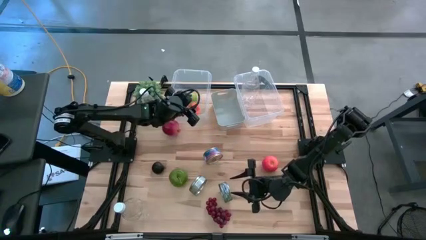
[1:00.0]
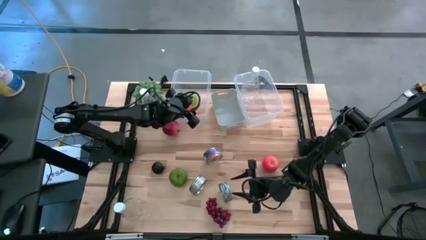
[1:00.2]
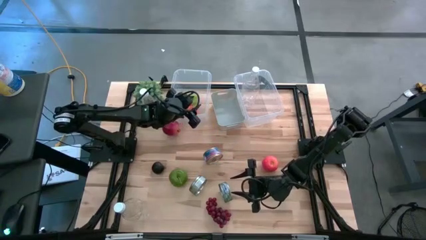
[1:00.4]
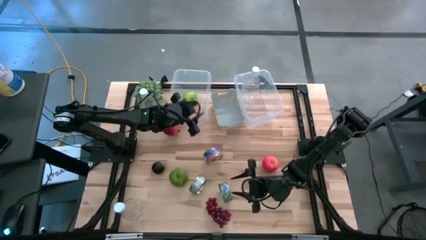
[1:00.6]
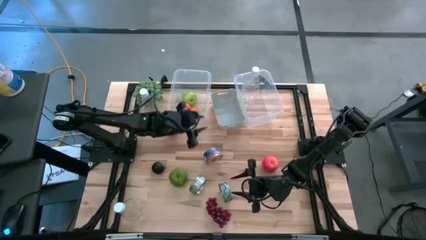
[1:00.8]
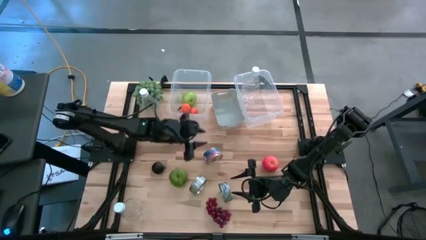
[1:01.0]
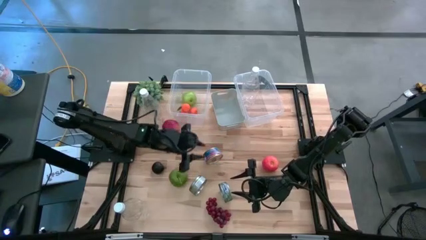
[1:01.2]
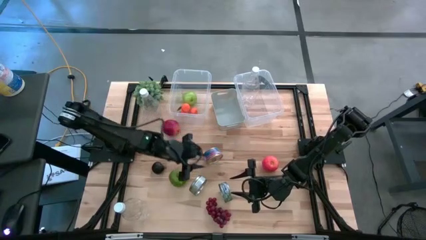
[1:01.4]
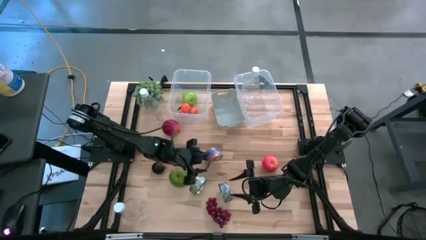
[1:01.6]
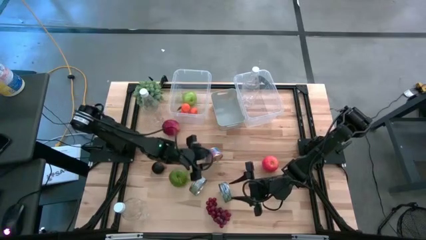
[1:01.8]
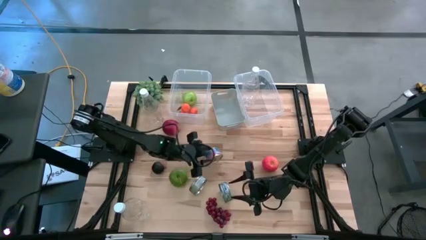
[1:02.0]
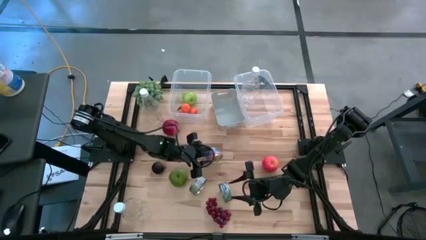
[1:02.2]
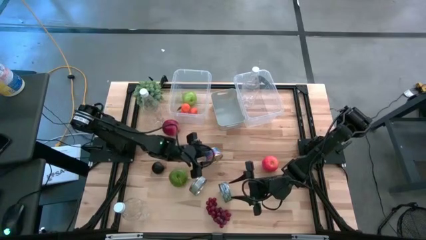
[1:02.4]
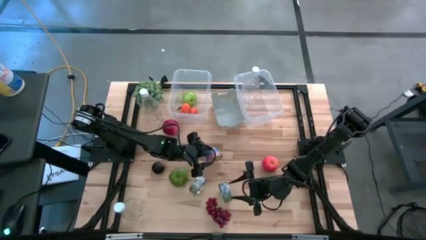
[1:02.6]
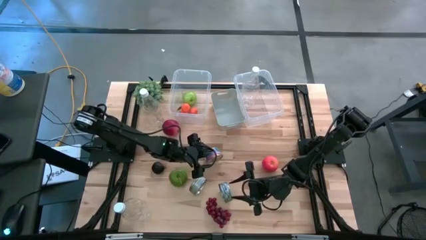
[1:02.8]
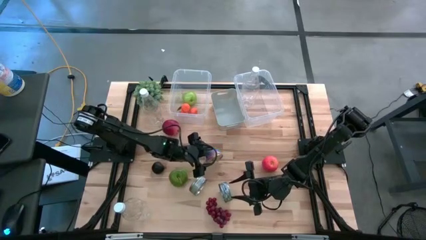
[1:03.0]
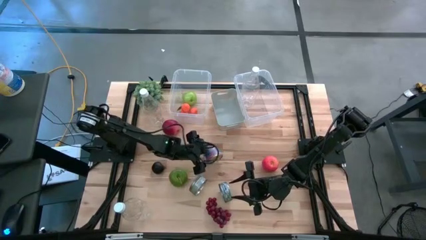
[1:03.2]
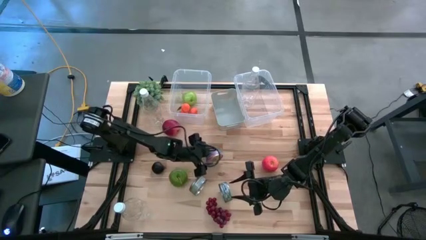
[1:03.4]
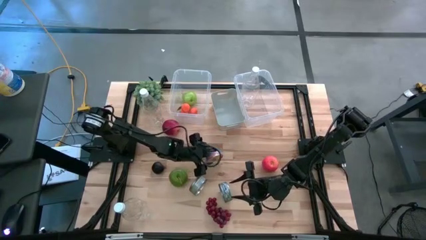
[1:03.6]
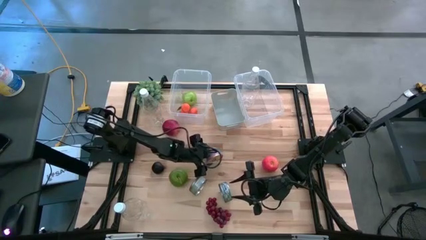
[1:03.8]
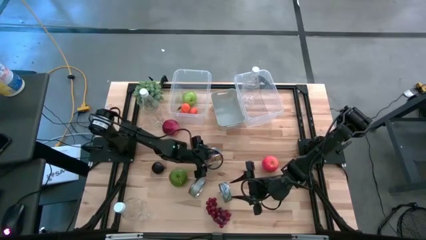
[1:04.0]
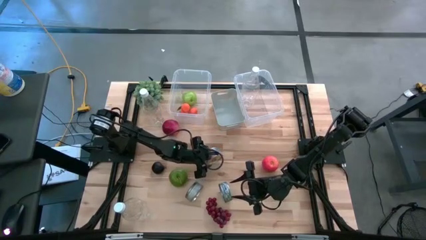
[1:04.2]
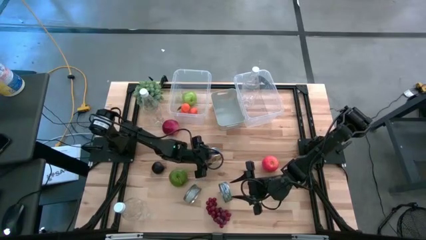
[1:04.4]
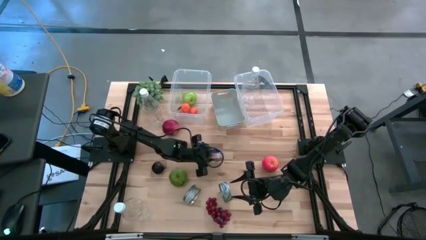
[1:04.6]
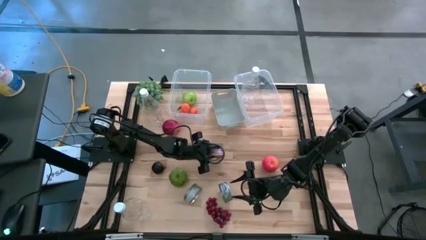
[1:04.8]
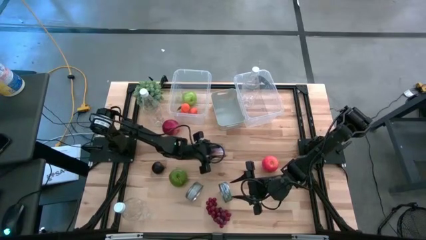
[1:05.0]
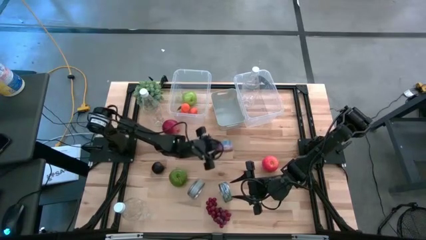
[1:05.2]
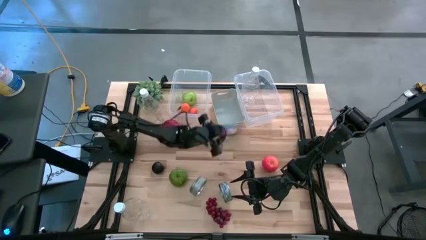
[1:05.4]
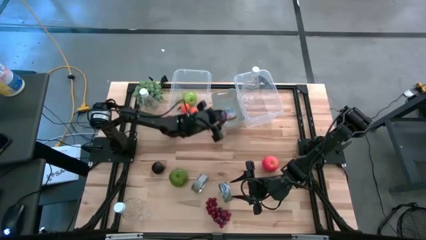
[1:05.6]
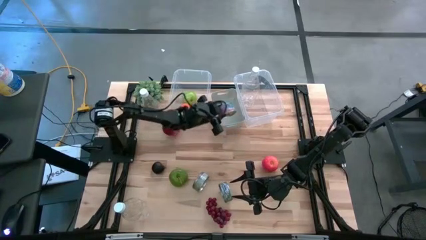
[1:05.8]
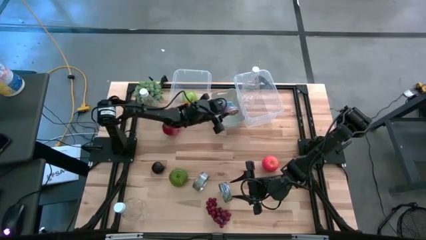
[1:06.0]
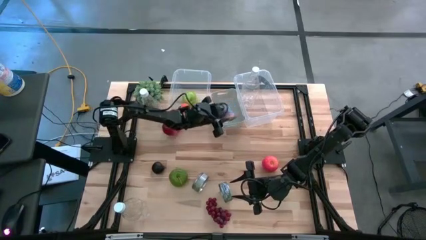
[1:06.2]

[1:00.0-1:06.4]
Task: Pick & Place Food Item
Put the blue pink tuna can into the gray bin

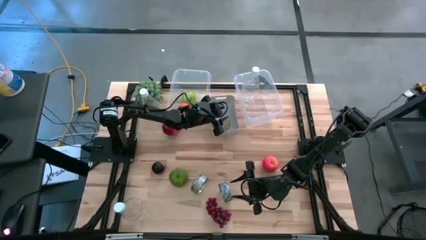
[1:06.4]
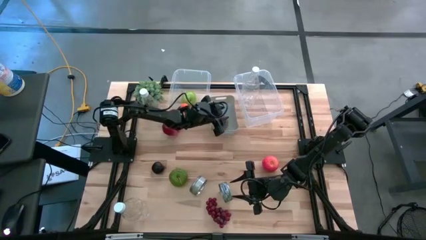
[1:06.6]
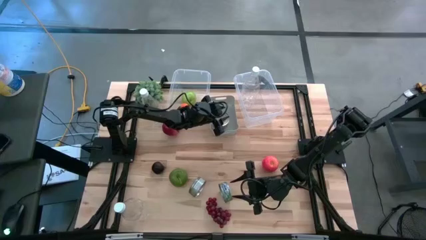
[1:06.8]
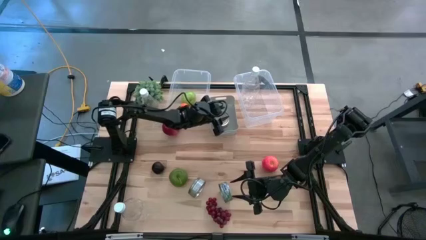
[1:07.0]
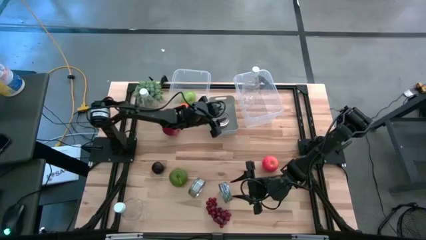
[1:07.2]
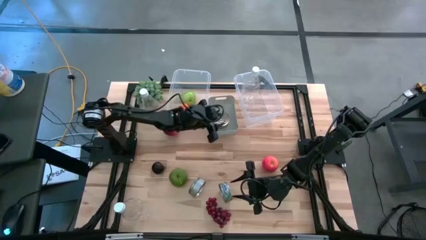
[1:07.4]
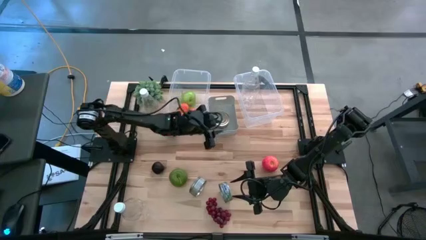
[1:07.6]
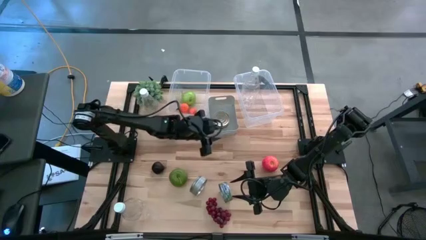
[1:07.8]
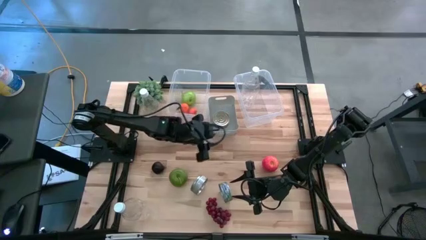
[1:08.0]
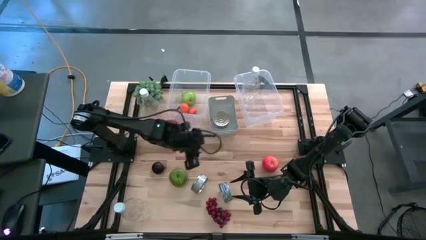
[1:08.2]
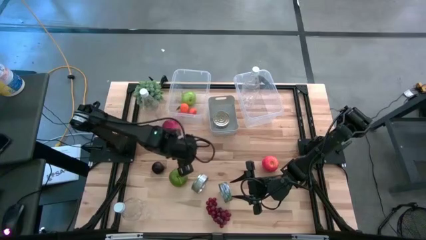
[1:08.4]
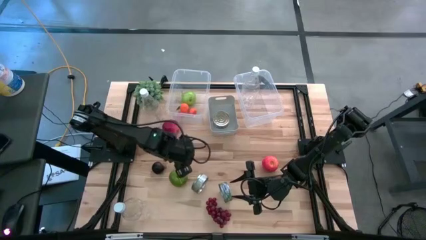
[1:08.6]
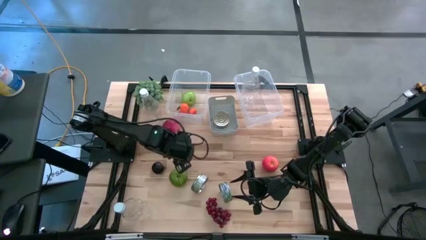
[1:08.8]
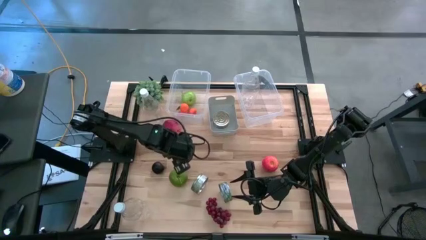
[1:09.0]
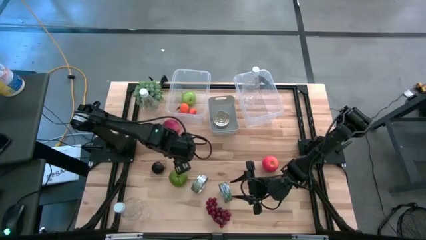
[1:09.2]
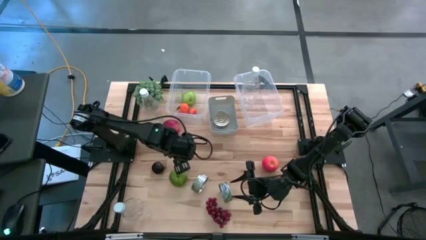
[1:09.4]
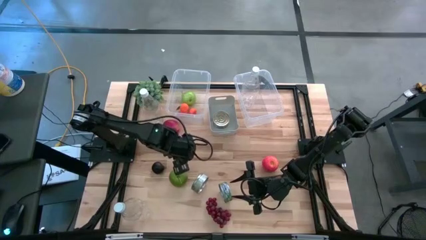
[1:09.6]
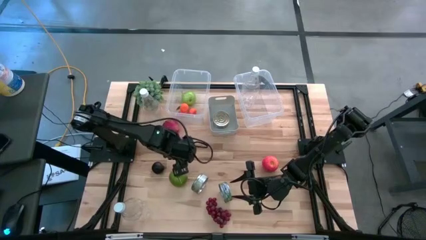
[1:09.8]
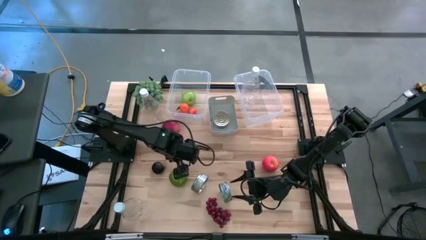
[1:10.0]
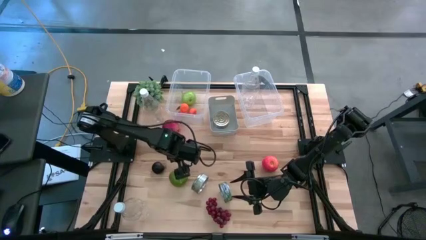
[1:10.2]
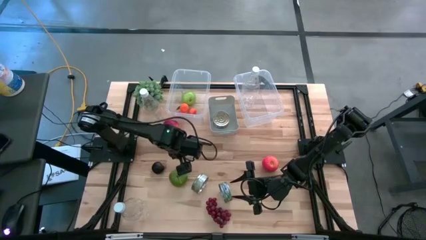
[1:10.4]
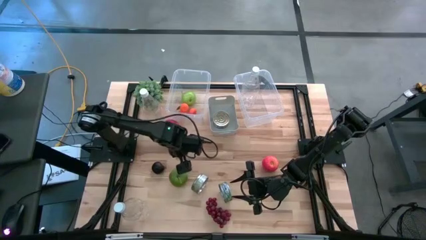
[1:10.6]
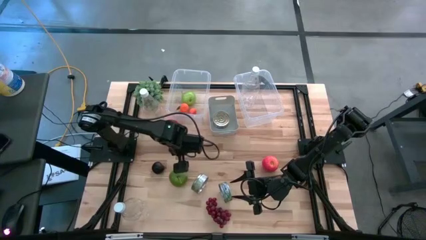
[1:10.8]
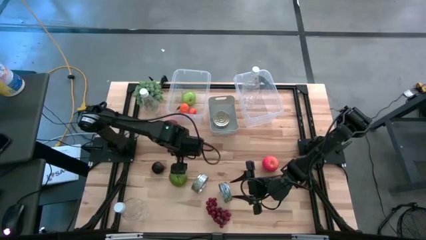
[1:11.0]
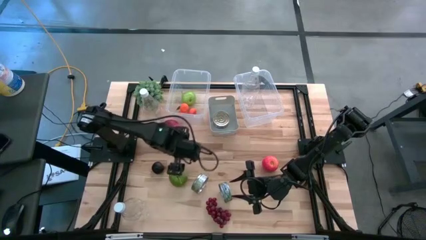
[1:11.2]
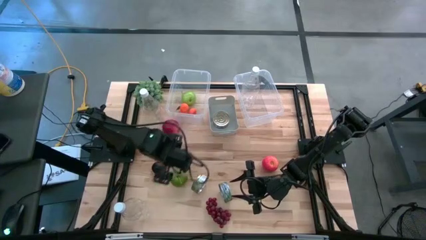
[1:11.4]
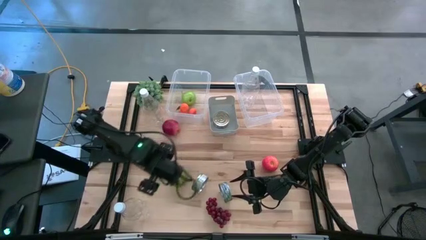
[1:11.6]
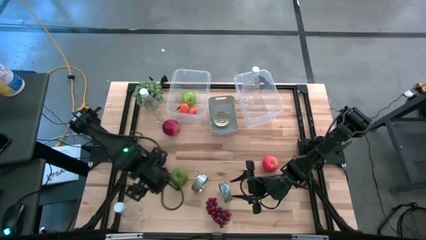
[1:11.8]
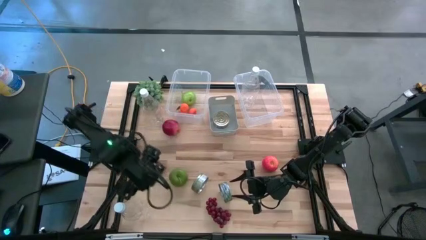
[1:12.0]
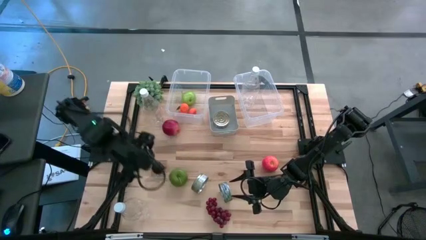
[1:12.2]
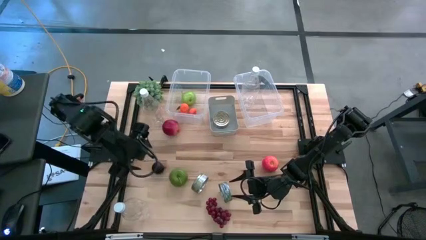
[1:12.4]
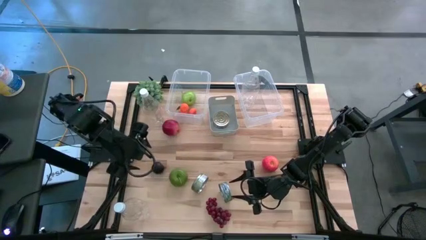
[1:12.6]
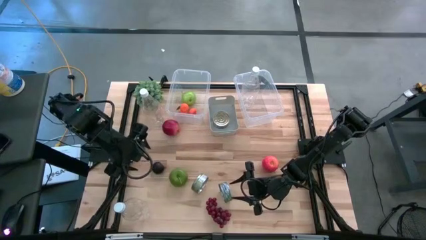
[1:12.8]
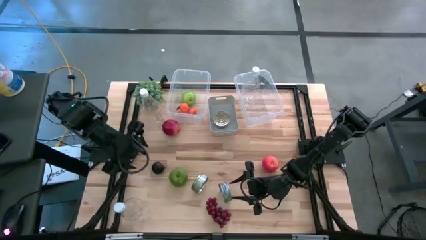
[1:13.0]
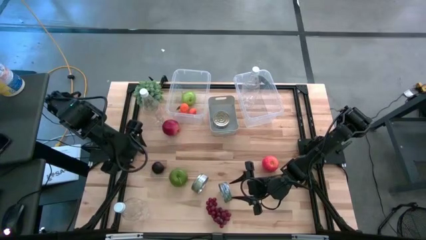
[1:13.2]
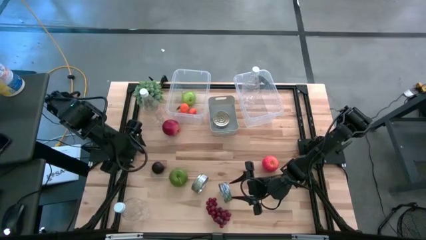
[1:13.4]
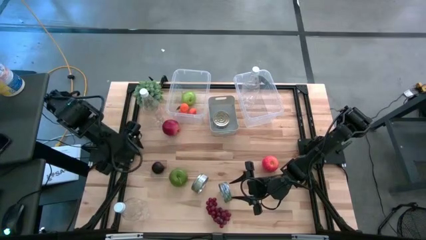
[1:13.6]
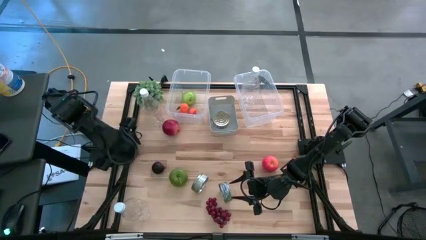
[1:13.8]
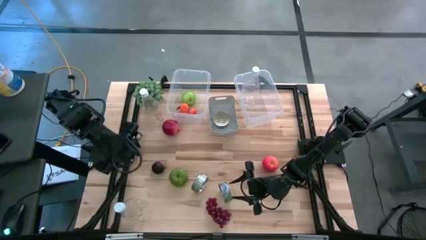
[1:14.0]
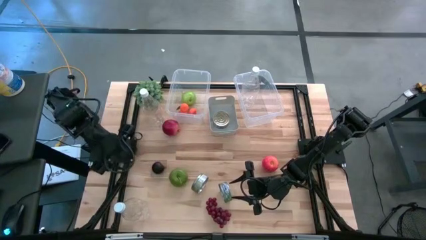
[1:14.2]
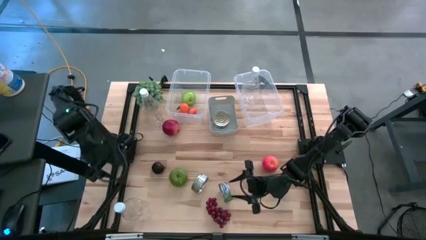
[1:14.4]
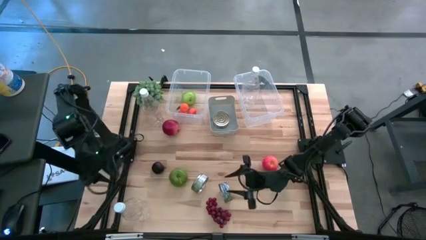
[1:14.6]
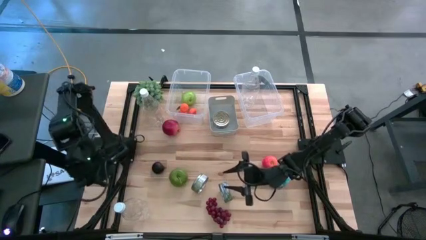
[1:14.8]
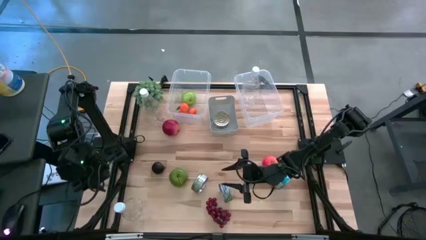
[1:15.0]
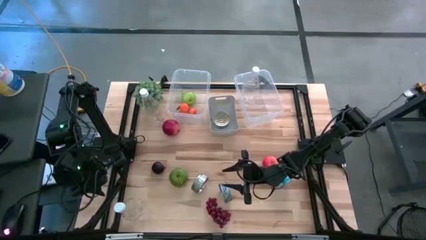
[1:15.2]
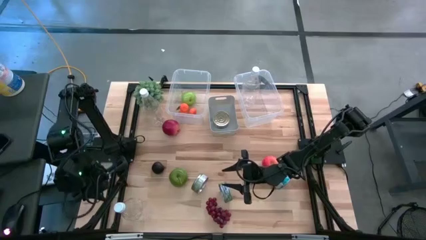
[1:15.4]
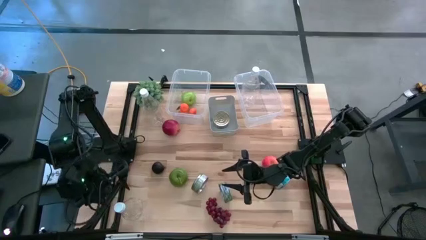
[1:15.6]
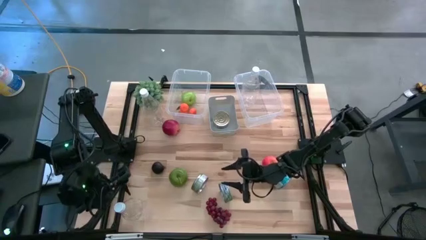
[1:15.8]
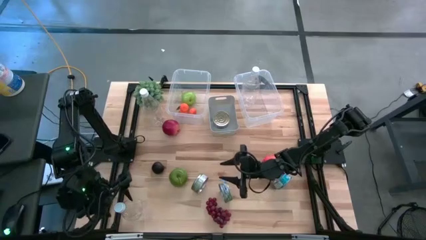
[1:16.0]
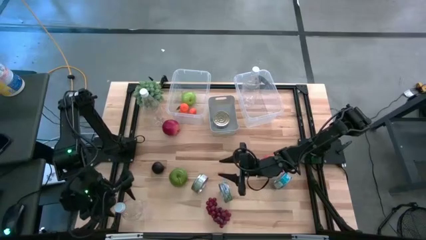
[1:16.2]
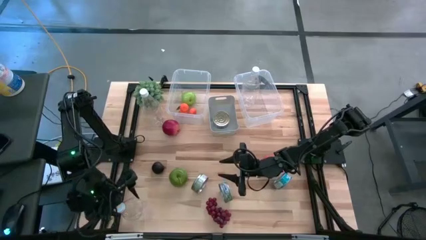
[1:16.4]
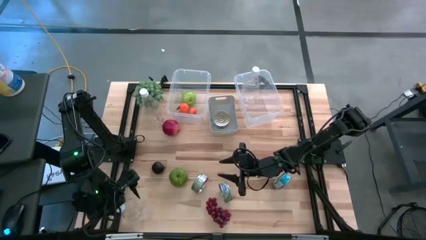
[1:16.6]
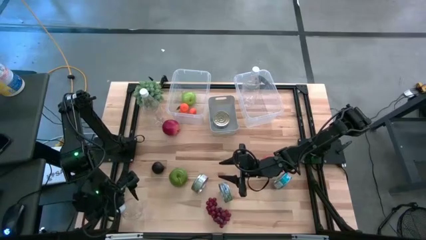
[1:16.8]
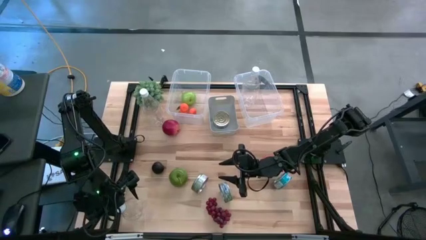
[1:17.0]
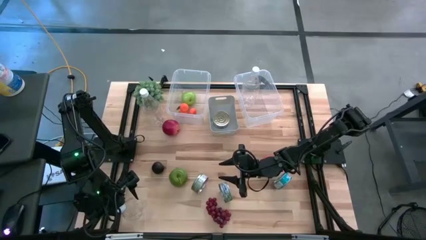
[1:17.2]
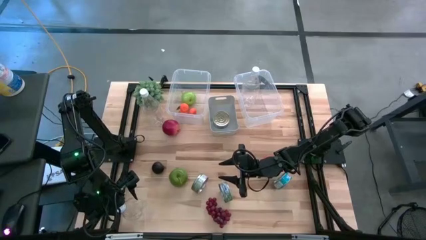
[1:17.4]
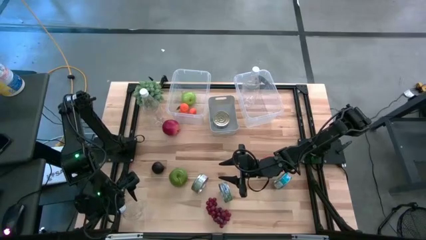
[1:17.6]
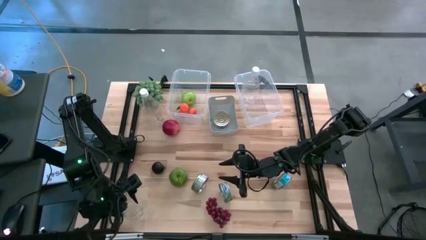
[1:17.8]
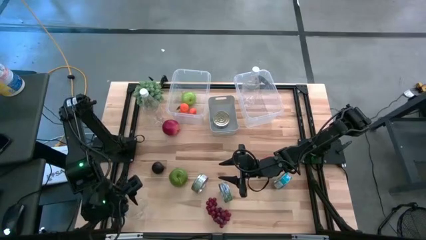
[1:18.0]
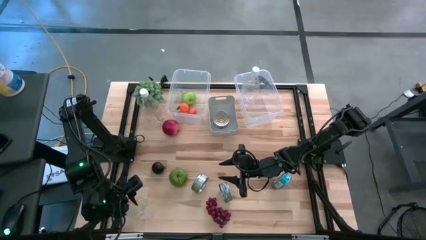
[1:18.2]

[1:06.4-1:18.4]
Put the bottom plastic bottle into the right transparent bin
